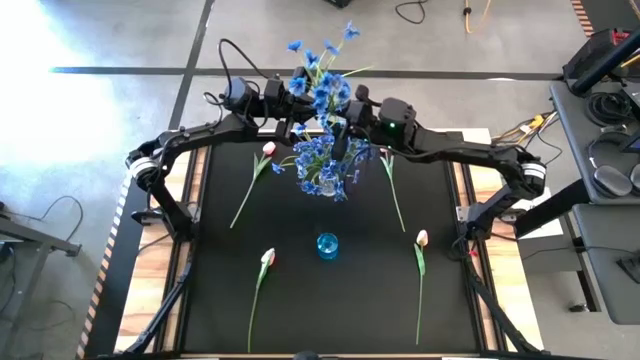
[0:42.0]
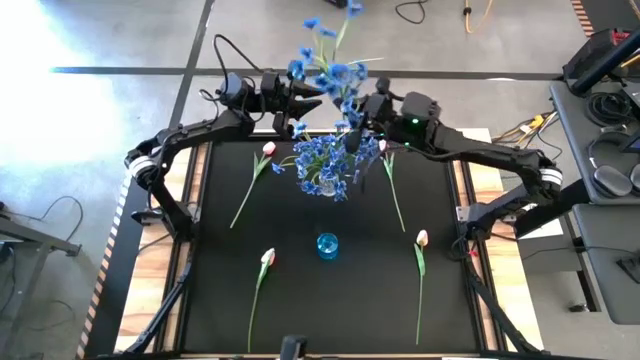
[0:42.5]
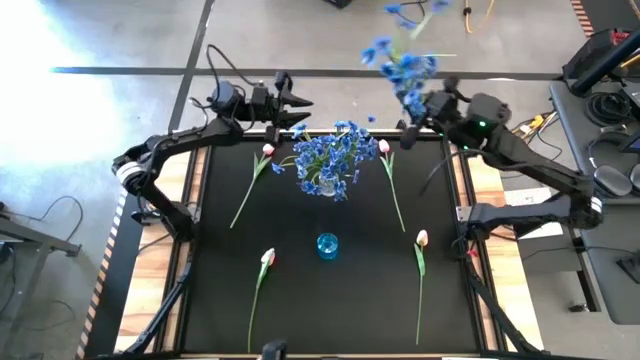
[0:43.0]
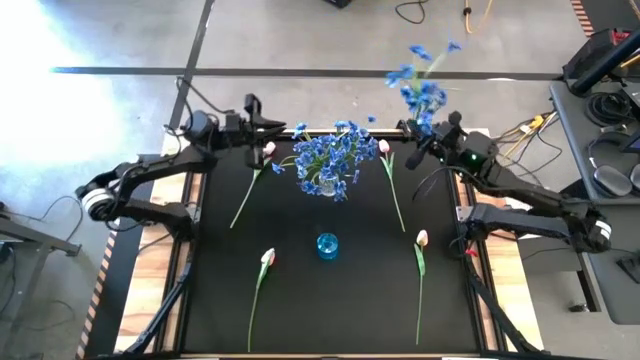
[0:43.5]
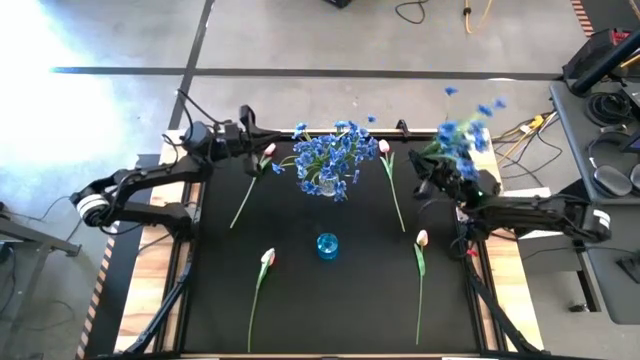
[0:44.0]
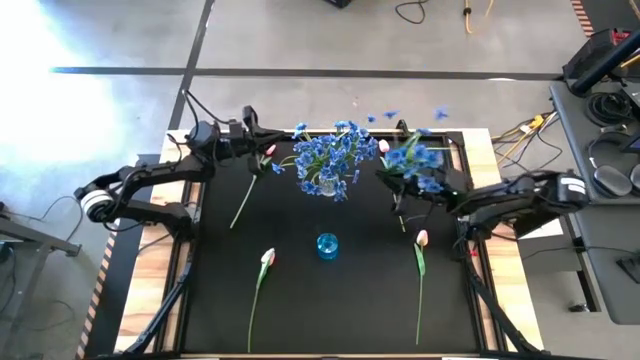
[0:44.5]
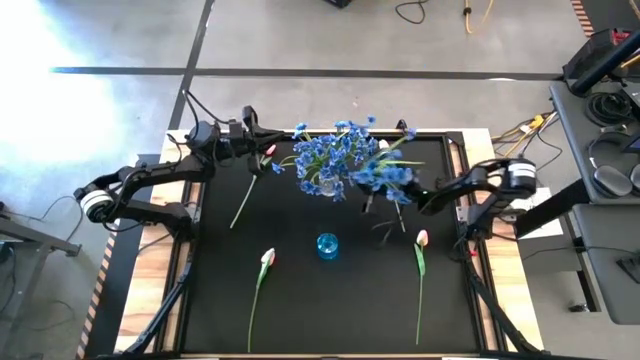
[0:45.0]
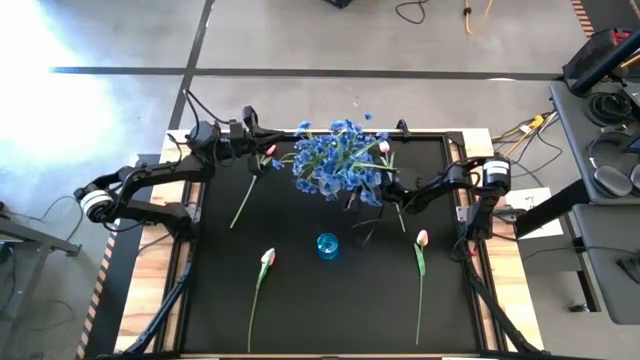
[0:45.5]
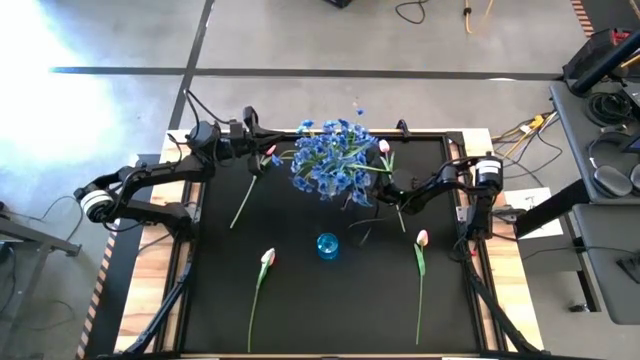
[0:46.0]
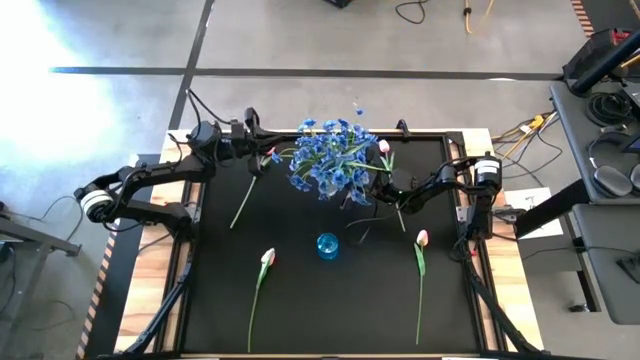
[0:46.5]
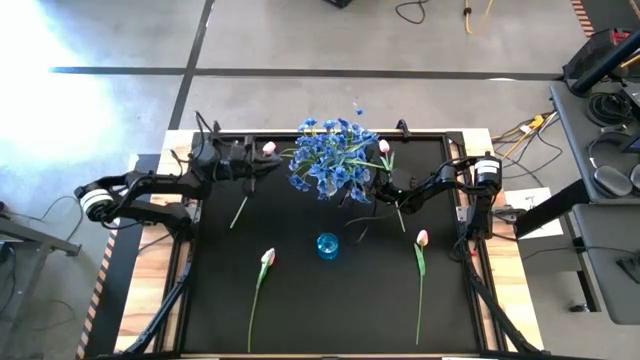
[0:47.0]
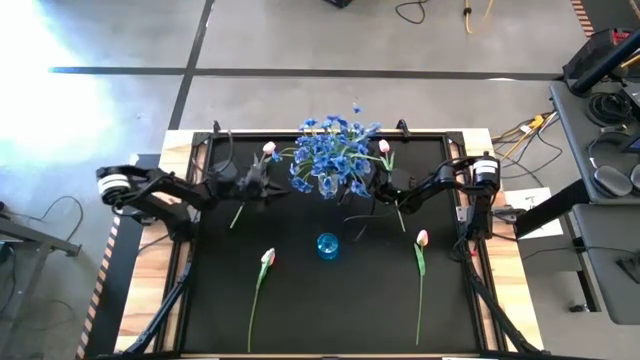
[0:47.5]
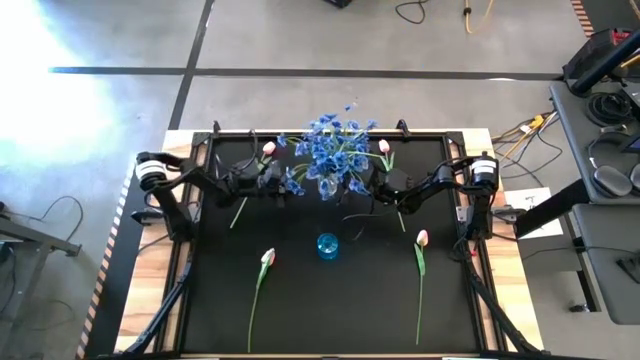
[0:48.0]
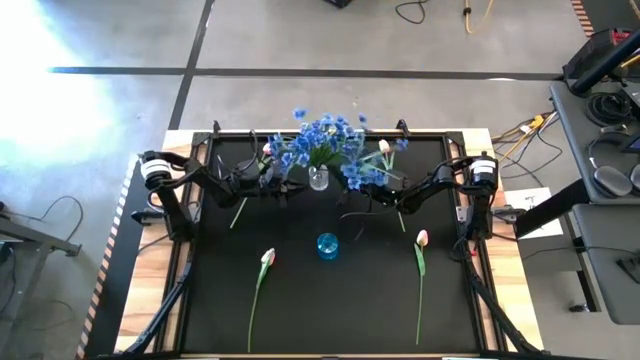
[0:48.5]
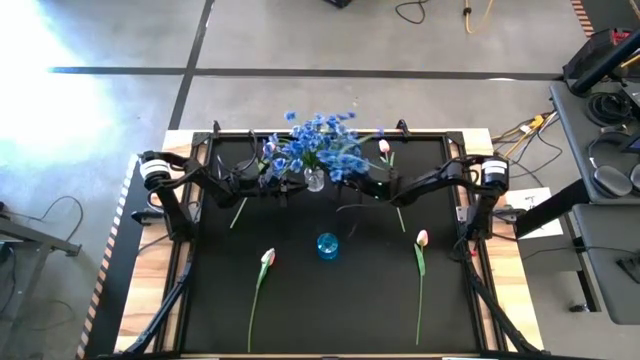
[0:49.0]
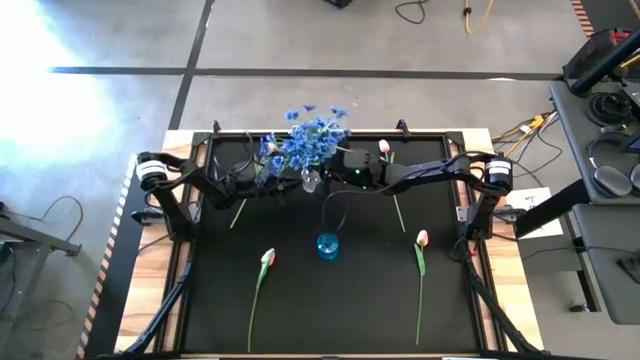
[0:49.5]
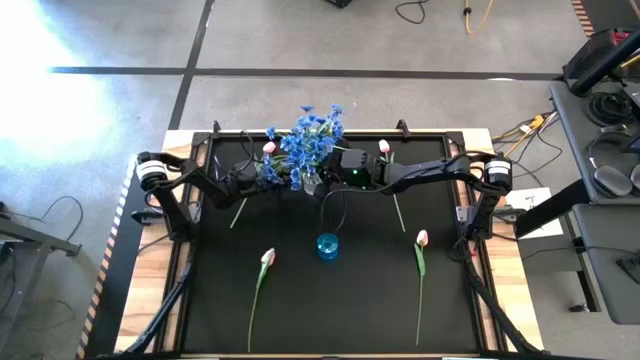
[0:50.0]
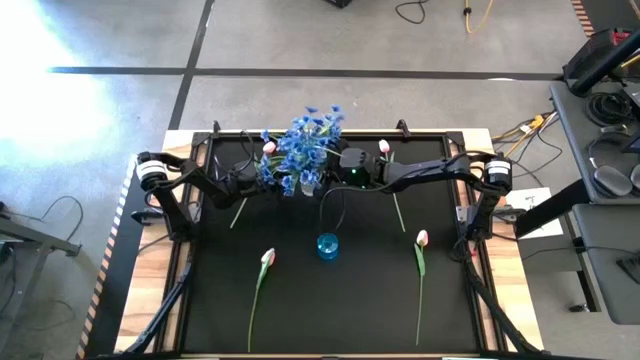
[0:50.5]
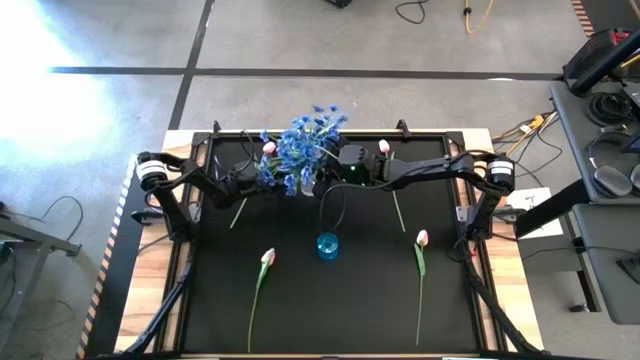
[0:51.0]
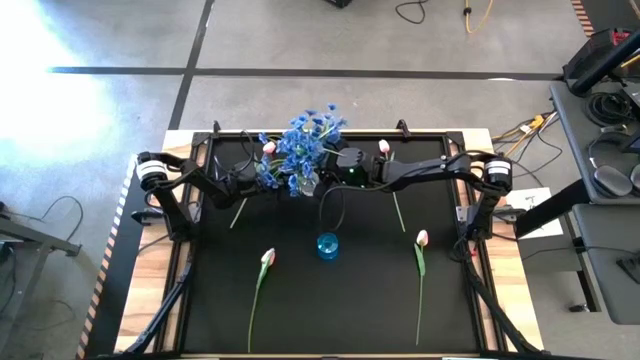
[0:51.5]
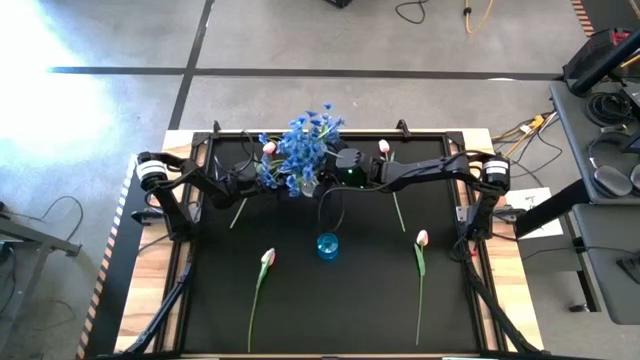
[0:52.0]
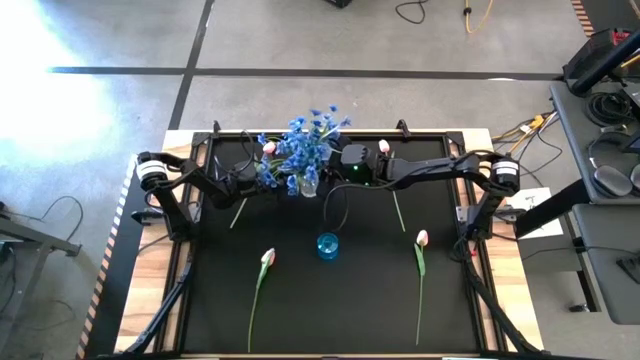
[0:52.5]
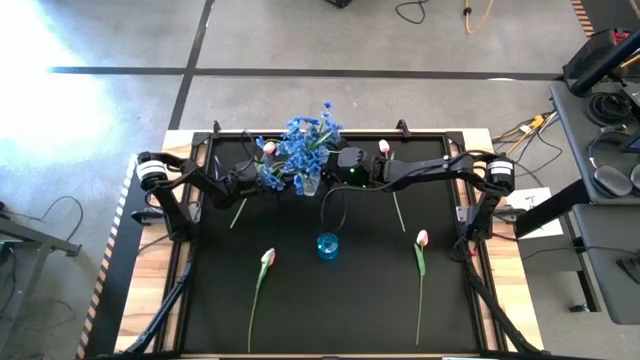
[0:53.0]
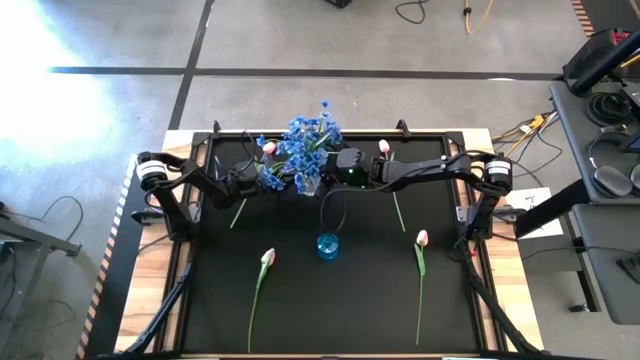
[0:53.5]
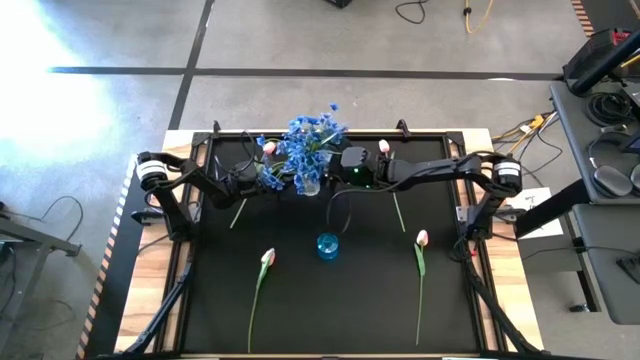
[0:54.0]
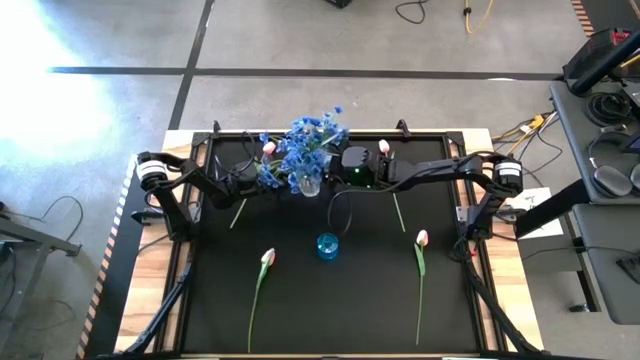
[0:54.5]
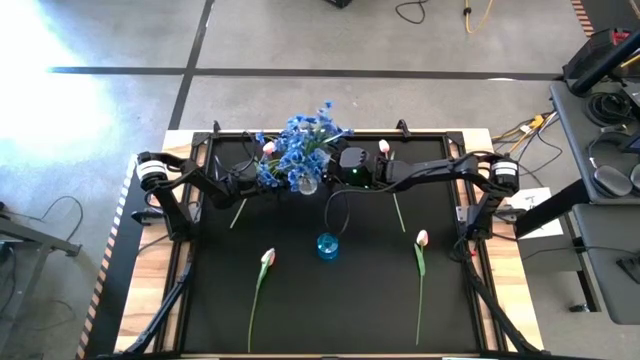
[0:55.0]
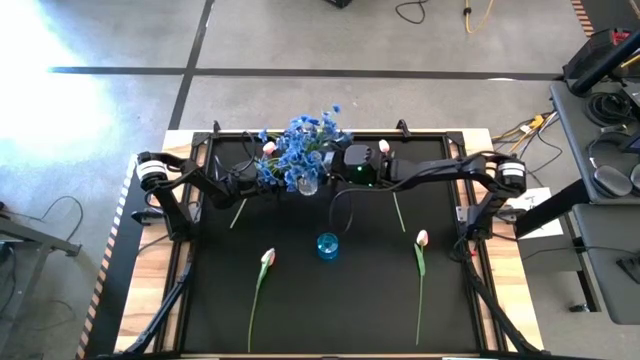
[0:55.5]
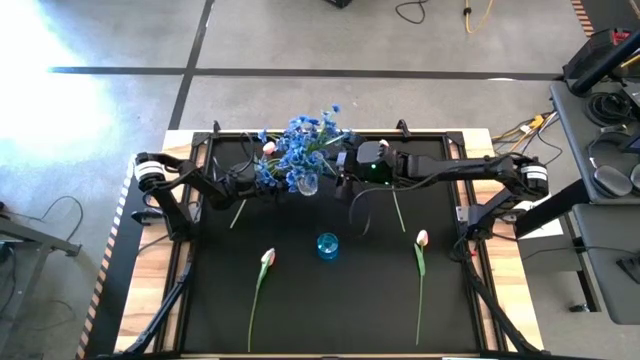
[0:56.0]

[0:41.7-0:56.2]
Task: Sort flowers into vase by color
Put the blue flowers into the transparent vase

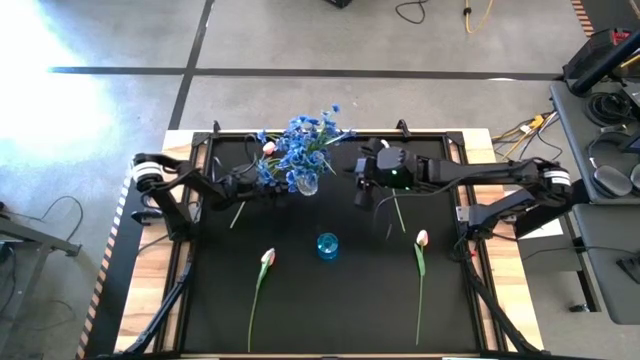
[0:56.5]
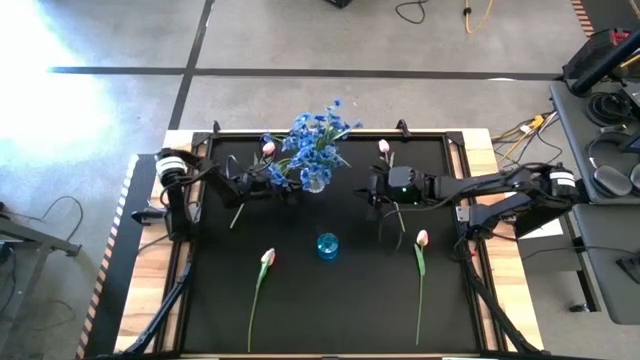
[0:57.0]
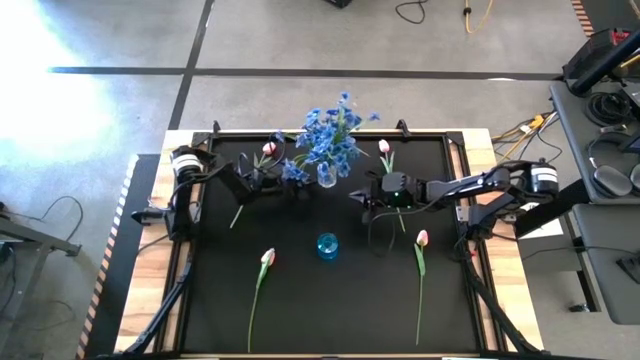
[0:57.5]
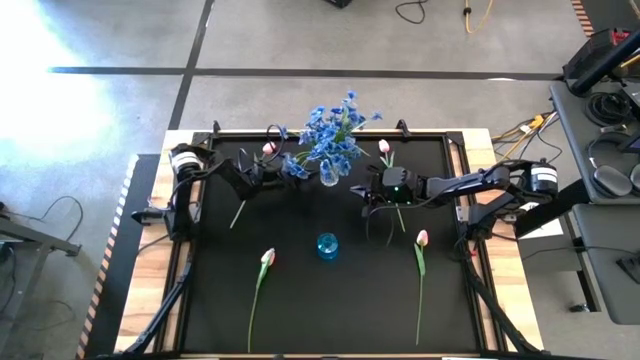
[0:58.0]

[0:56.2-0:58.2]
Adjust the transparent vase

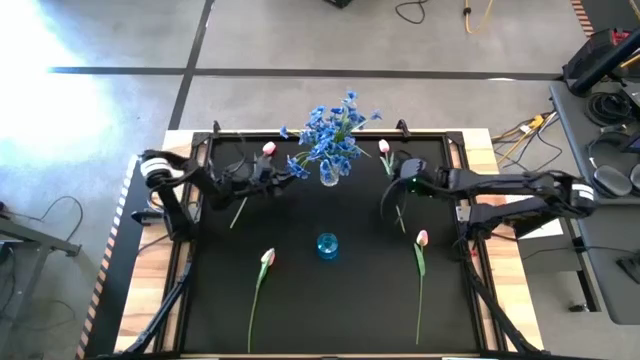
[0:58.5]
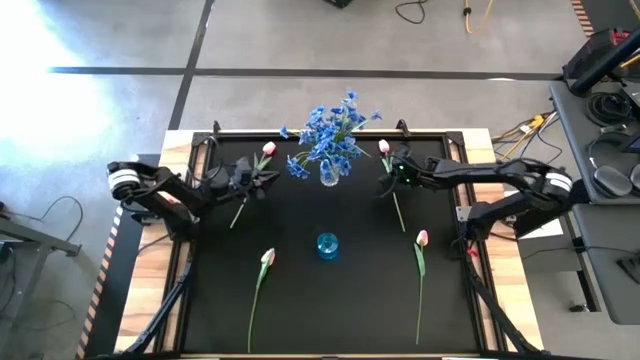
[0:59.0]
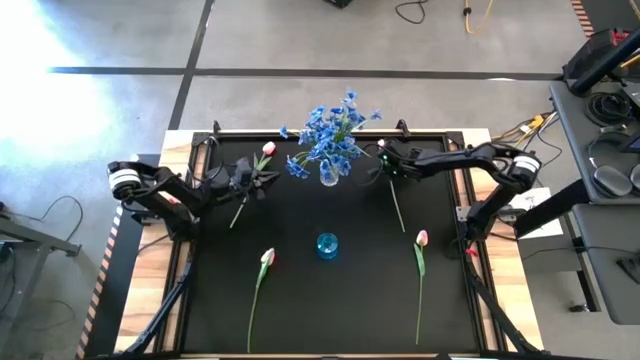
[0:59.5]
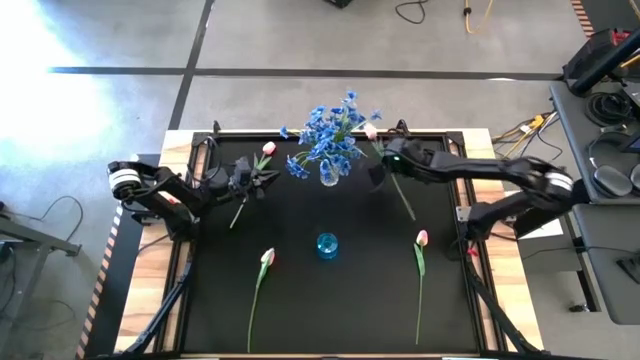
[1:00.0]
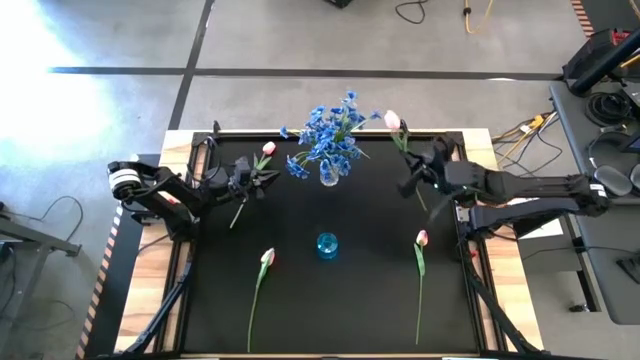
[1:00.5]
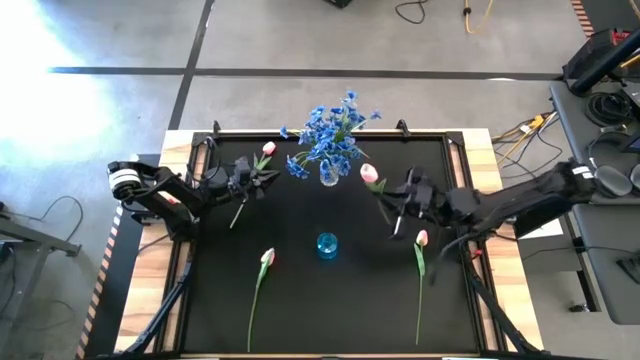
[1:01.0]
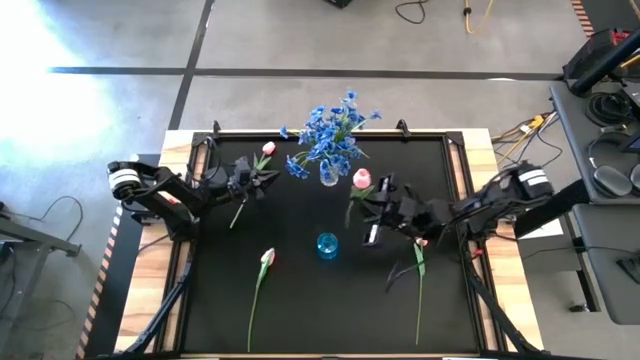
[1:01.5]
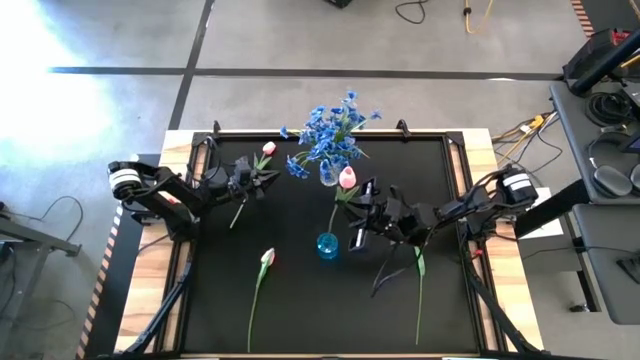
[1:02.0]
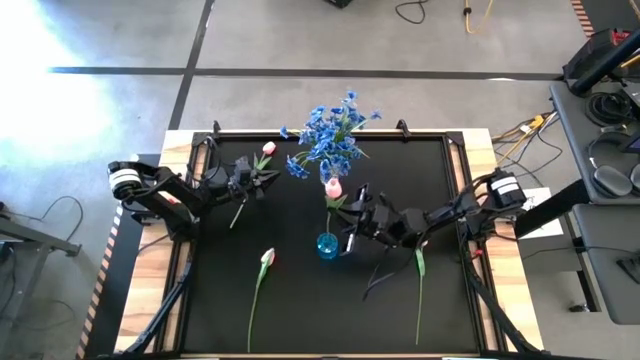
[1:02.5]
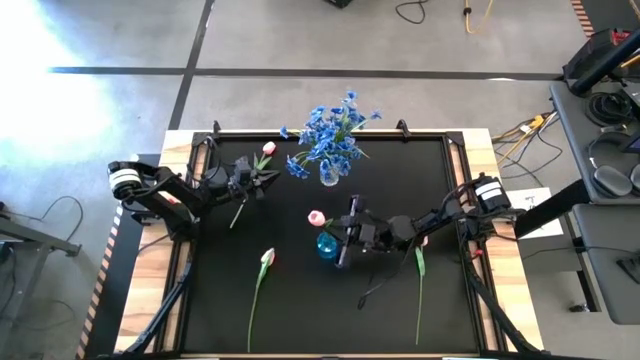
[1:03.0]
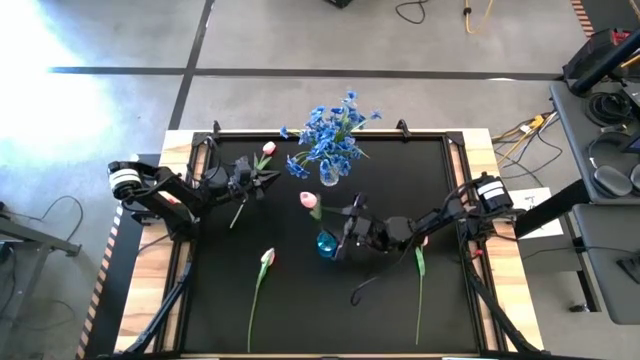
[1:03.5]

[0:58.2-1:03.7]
Put the top right pink tulip into the blue vase
